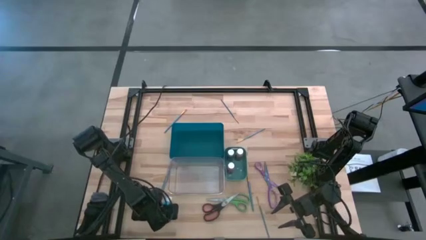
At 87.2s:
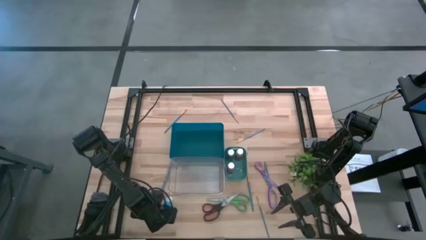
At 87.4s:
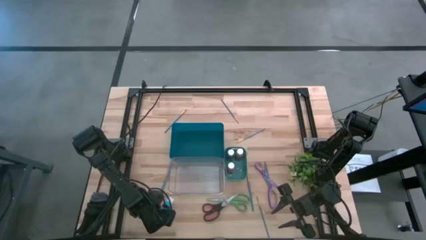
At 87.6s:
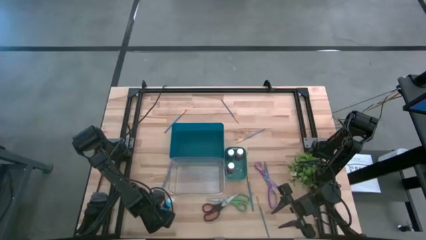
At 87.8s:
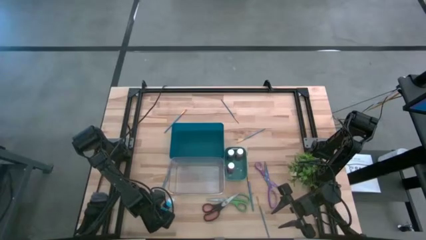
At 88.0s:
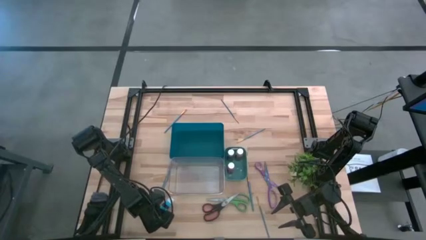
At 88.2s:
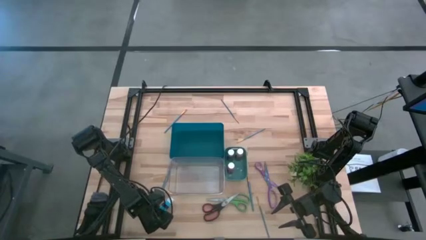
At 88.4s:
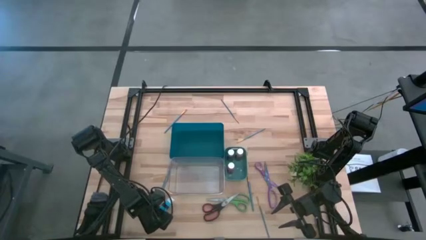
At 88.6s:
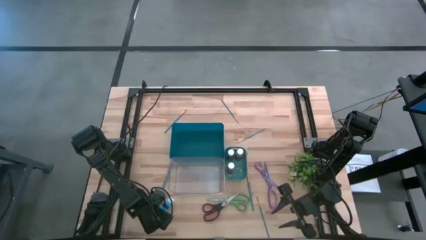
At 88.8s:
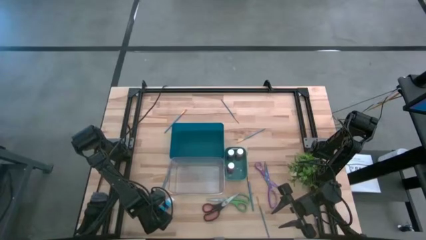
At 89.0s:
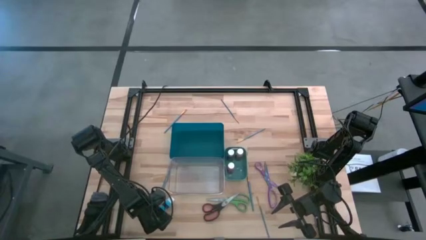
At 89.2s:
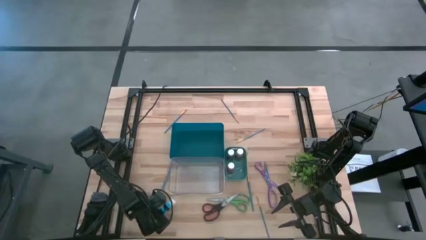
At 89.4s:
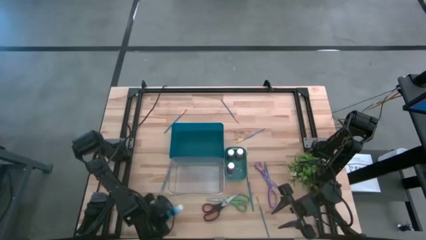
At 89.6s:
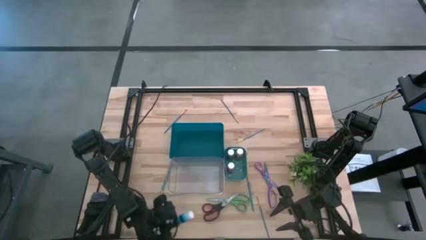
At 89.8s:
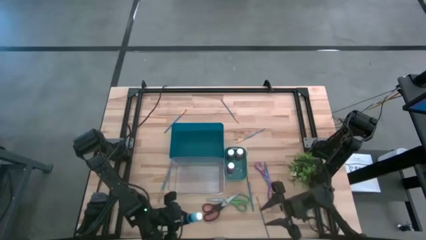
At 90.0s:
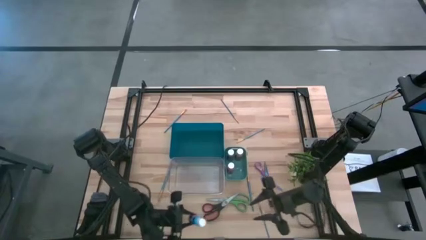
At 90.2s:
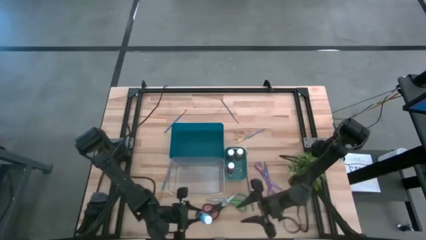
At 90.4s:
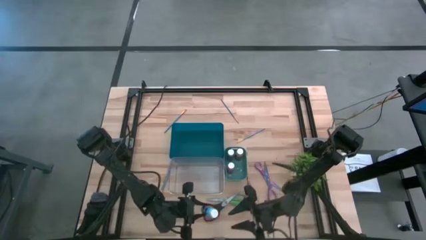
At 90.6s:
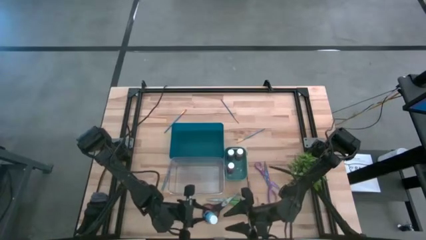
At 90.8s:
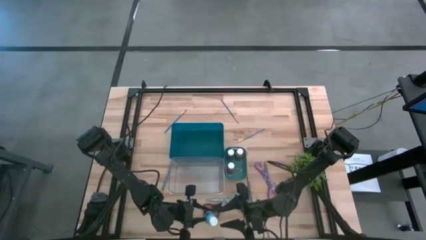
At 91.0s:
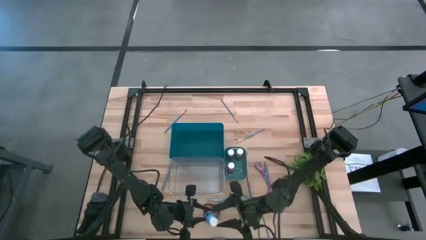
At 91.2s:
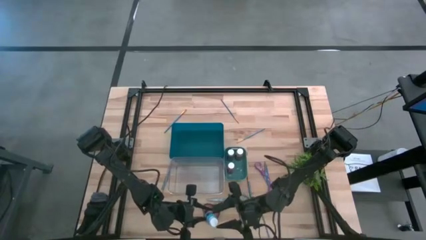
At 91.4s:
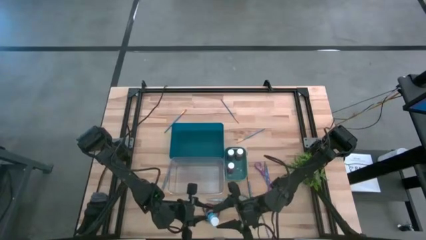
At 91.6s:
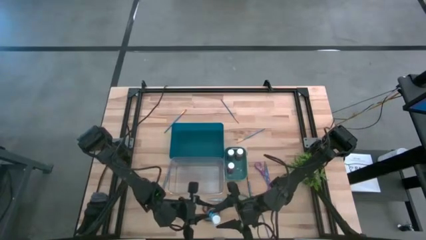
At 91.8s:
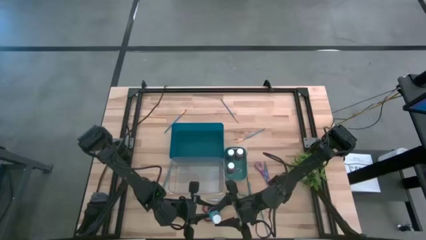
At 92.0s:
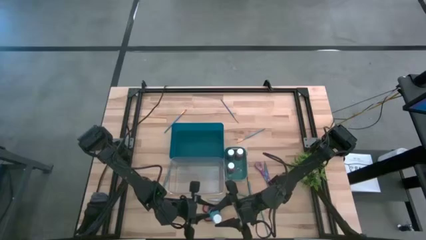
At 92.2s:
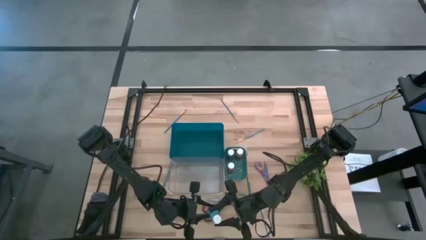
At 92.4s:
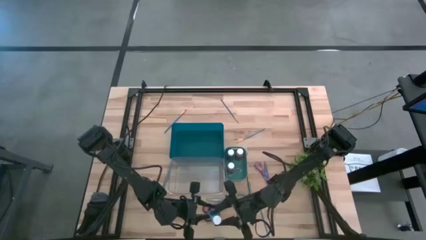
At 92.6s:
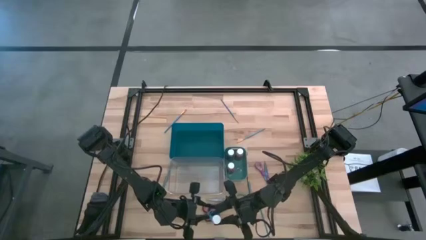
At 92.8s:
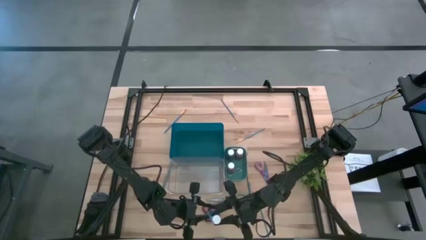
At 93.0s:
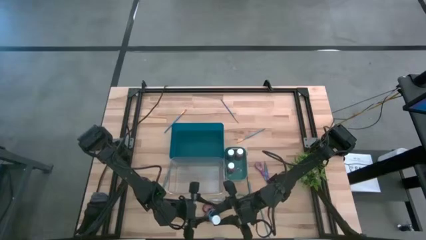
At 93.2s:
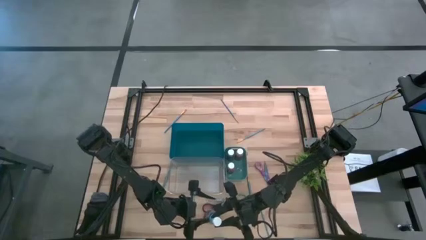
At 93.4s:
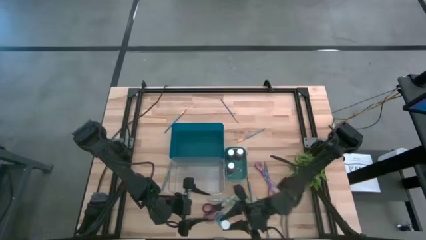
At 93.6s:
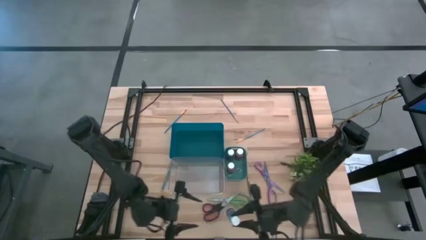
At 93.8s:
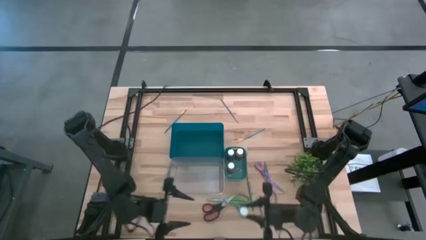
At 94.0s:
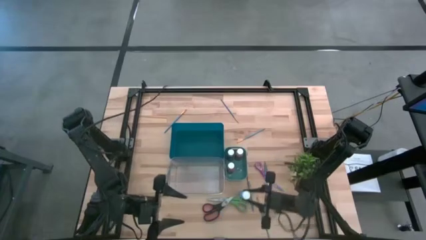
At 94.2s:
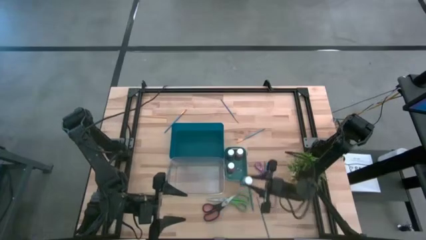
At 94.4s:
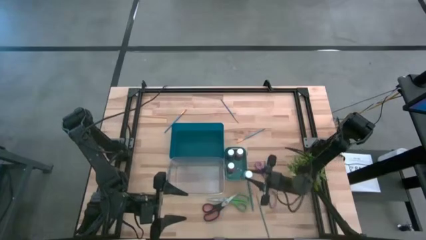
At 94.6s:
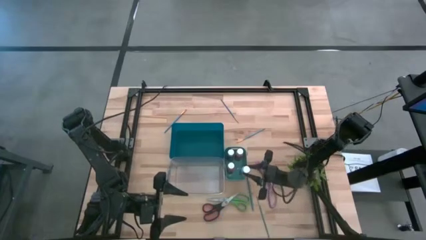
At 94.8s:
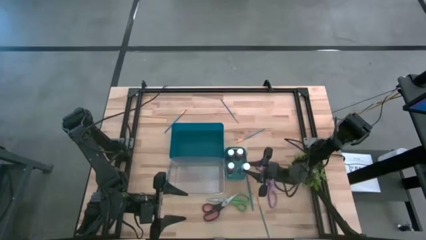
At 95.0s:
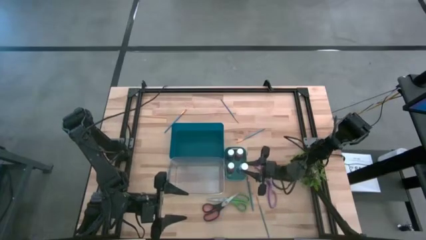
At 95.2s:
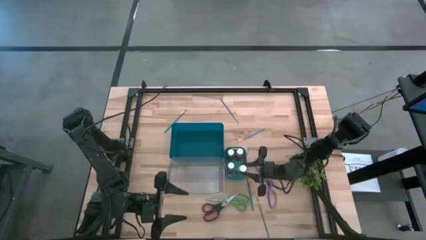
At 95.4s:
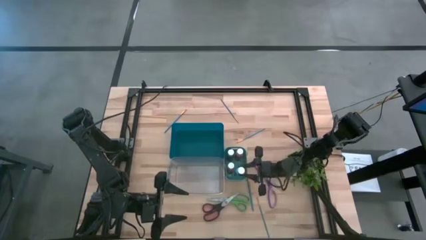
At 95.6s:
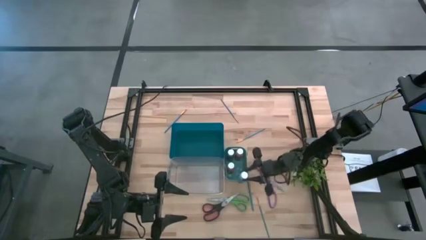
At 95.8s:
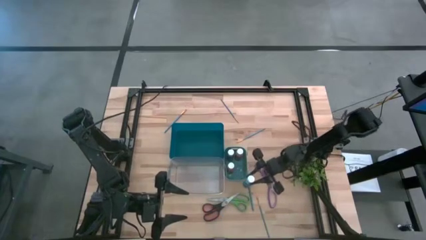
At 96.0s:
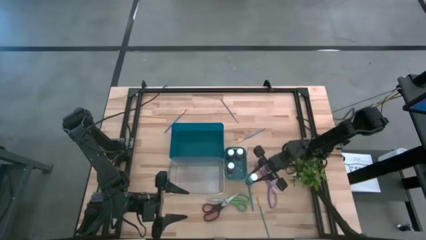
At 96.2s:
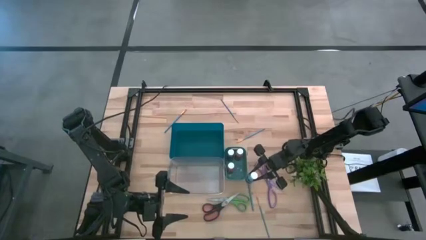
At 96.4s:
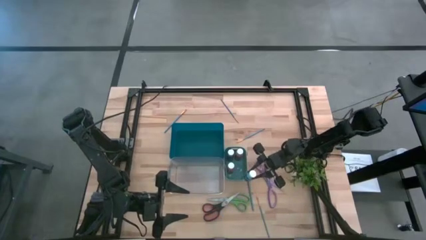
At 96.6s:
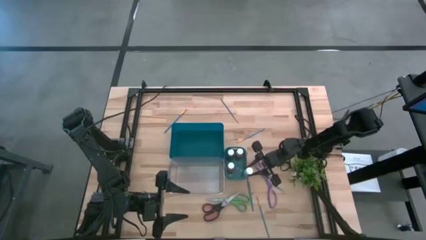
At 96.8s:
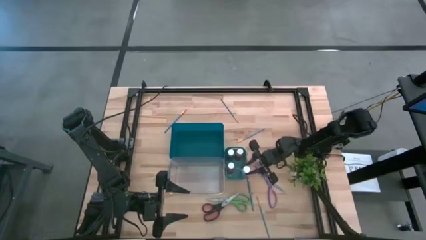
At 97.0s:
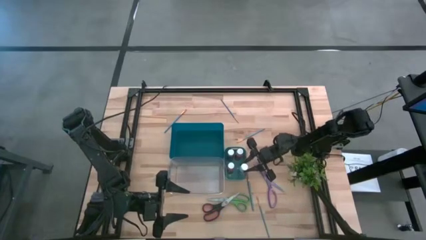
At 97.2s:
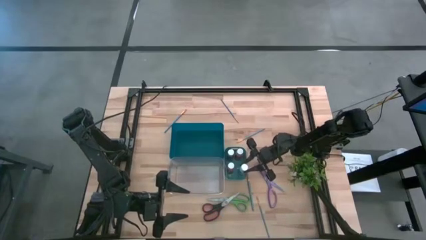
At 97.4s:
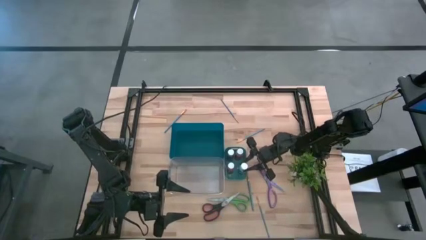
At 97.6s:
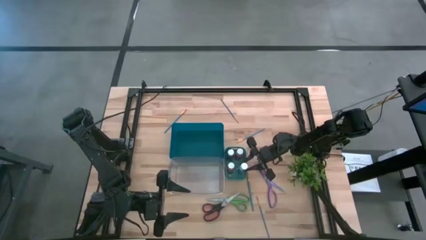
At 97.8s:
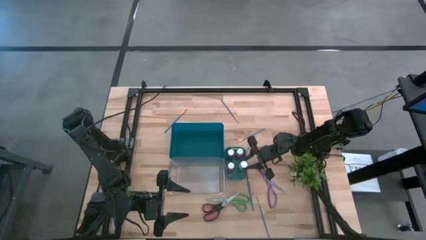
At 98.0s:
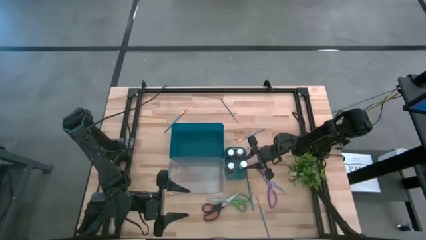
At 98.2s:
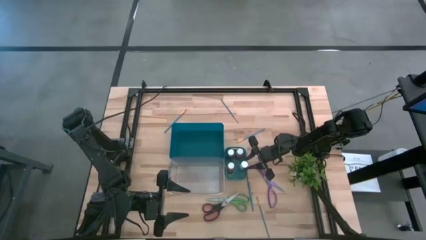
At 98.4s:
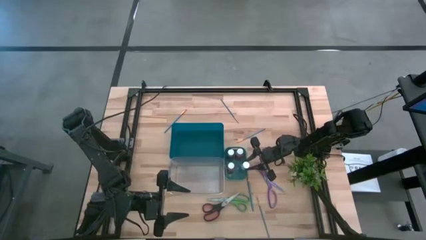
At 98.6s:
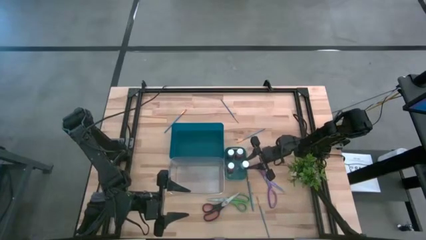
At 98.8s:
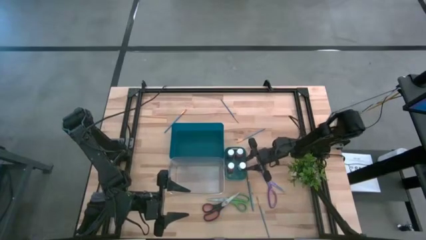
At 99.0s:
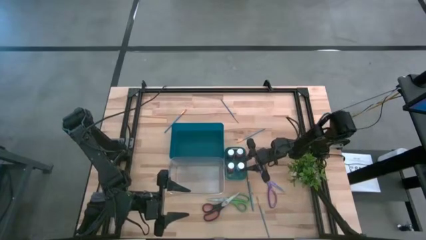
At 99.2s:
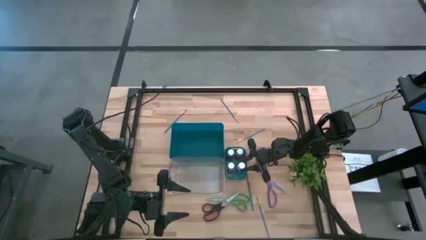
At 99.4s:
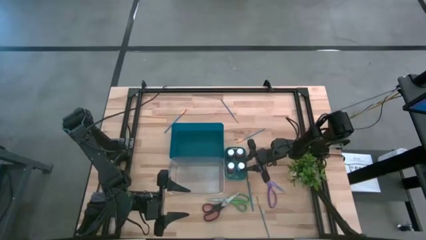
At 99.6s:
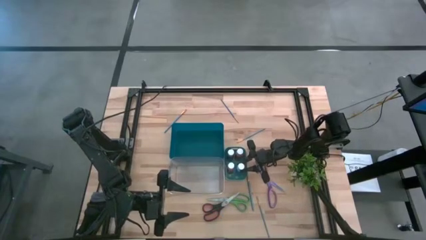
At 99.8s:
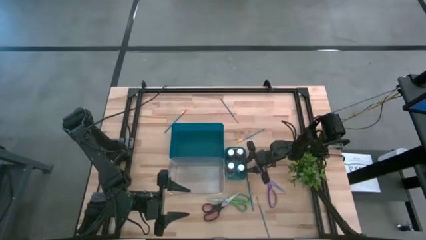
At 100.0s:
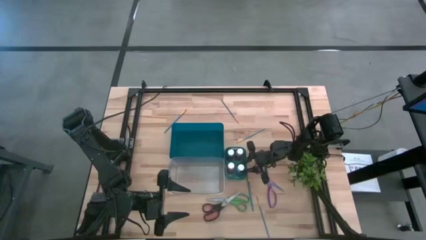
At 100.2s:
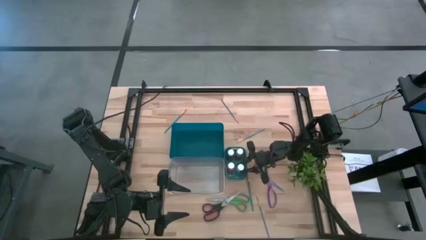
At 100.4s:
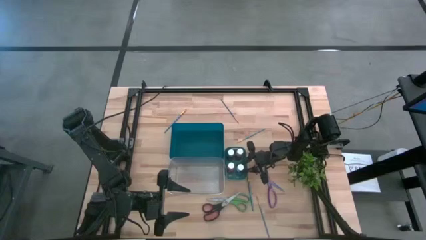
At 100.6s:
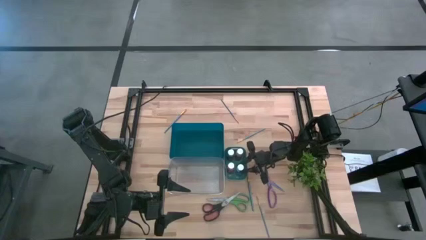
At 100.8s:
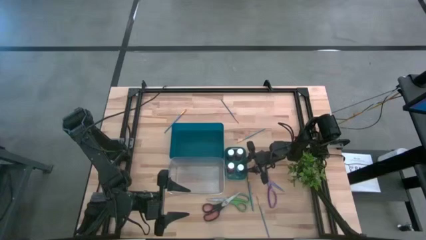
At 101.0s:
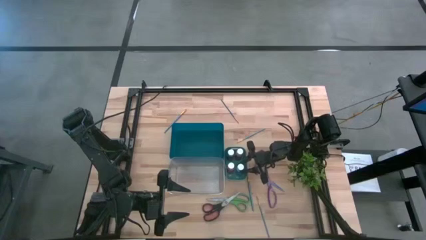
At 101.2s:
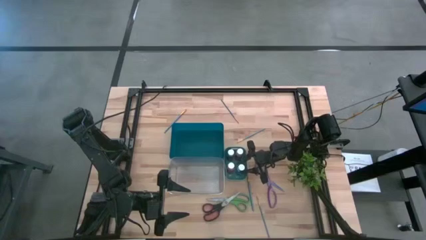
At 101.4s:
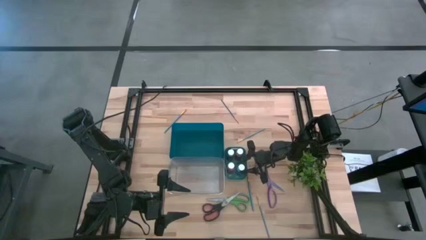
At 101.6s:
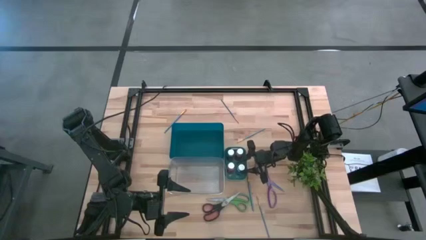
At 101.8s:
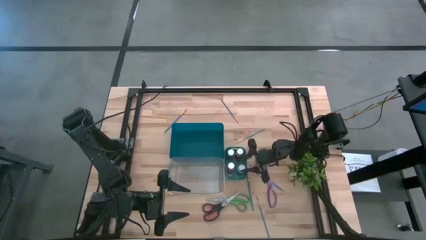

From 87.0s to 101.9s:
Task: Pick & Place Paint Supplies
Put the blue paint bottle into the green bin
